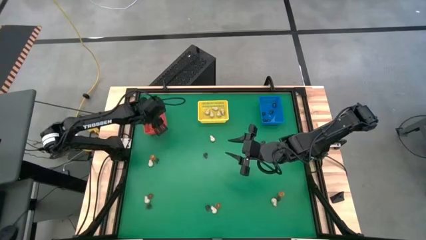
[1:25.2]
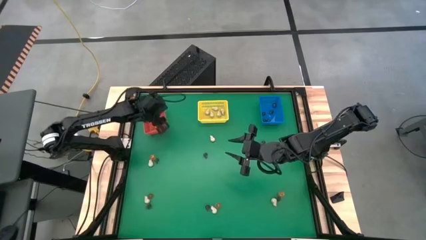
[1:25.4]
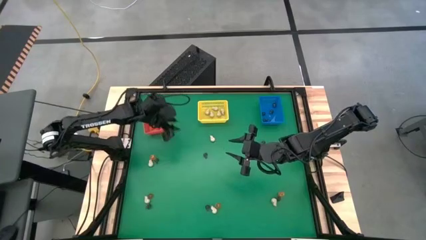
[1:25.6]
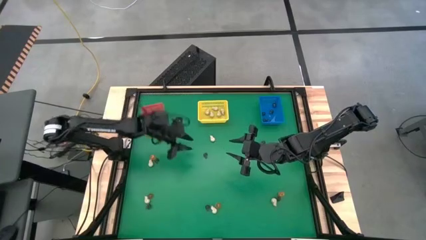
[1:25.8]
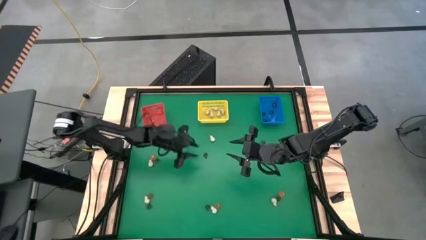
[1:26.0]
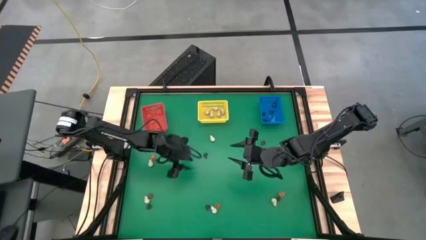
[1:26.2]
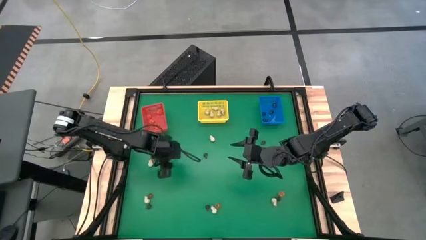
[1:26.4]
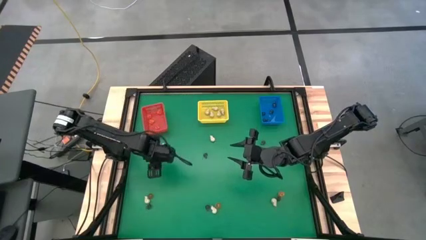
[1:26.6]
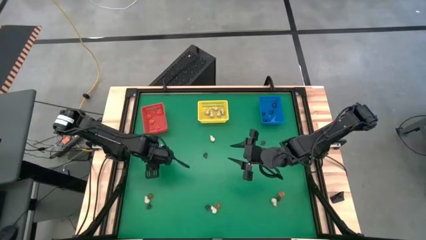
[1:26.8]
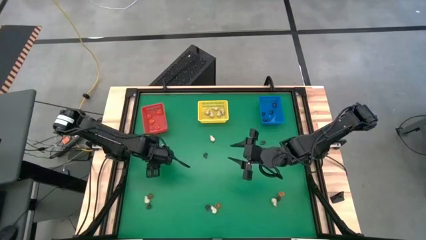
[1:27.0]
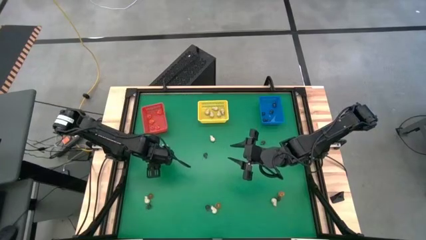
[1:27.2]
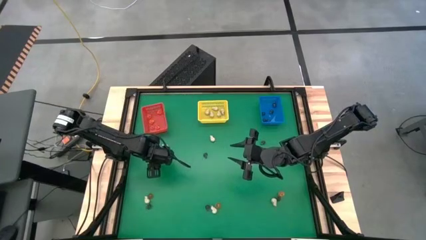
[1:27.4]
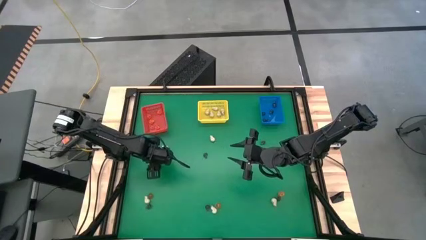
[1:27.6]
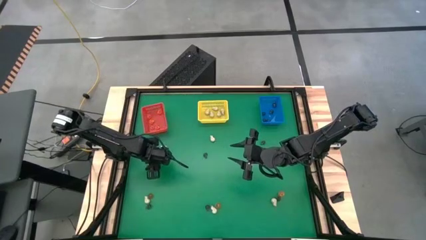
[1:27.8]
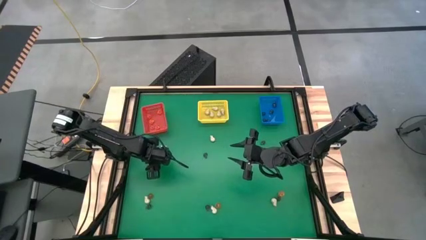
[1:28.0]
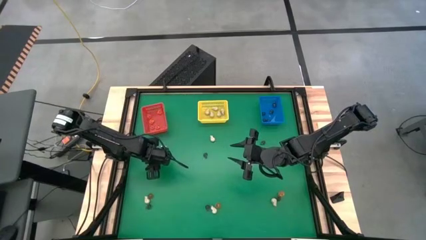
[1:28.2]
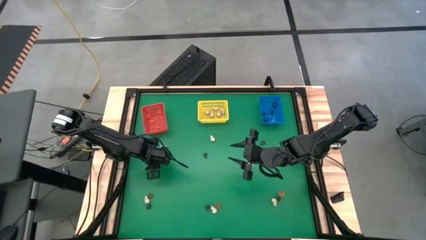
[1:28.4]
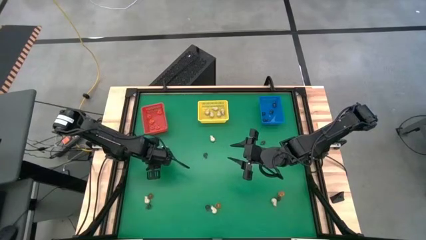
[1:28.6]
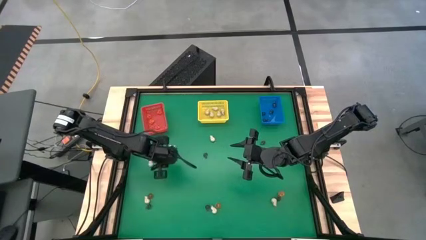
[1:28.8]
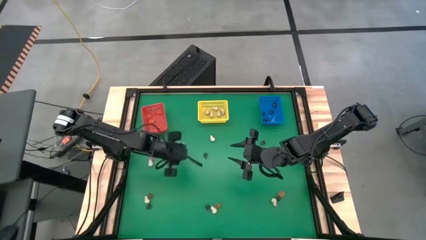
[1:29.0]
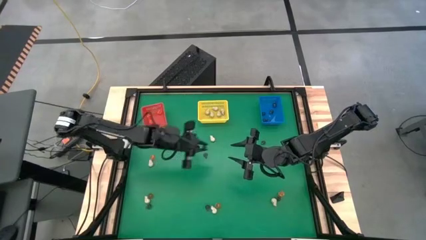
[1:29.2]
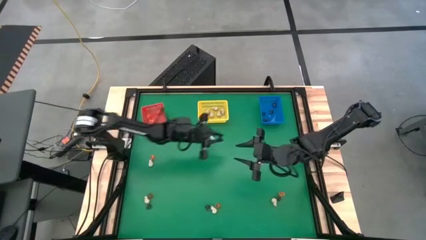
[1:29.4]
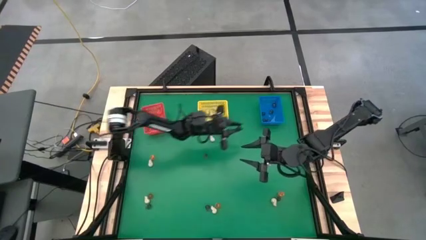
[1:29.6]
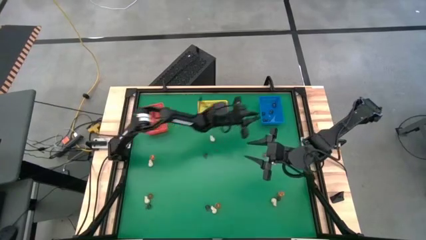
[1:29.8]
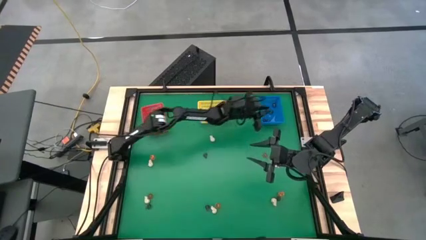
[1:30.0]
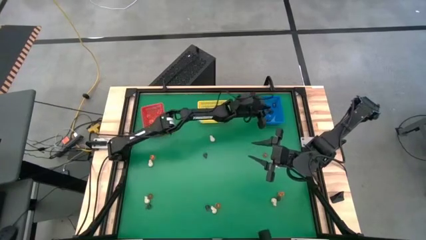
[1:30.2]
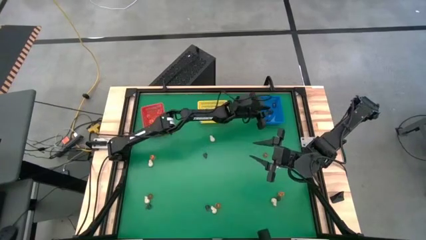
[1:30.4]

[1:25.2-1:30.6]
Task: Sort Halloween decoration
Put the purple skull toy into the blue bin

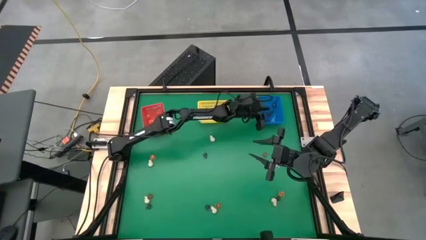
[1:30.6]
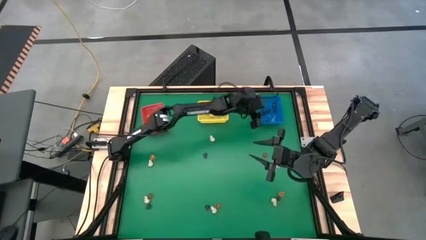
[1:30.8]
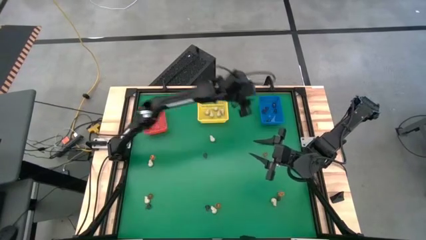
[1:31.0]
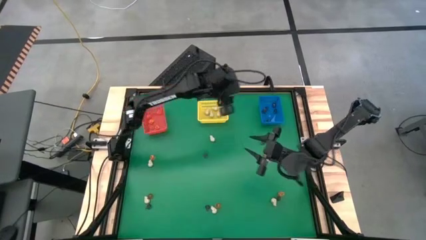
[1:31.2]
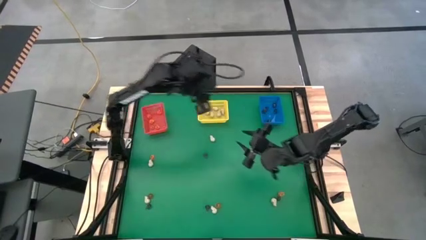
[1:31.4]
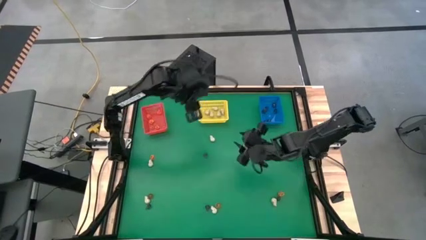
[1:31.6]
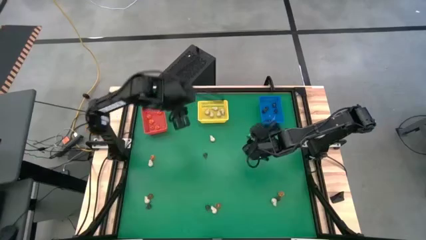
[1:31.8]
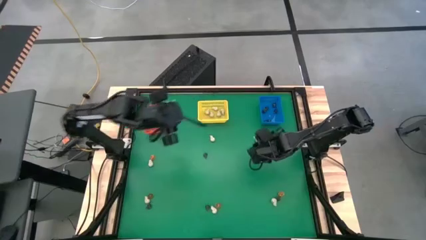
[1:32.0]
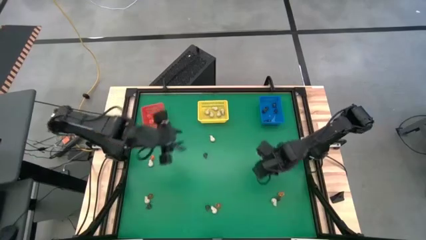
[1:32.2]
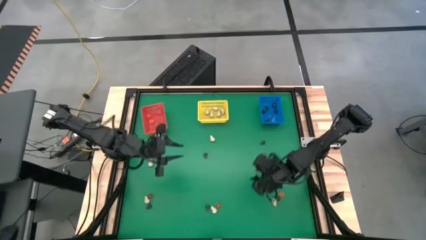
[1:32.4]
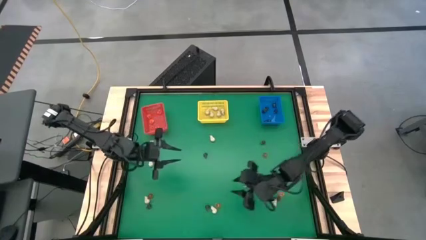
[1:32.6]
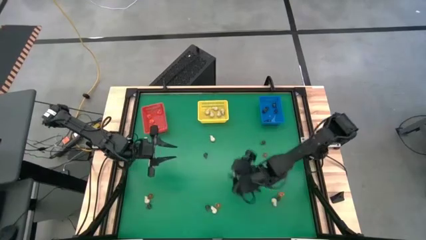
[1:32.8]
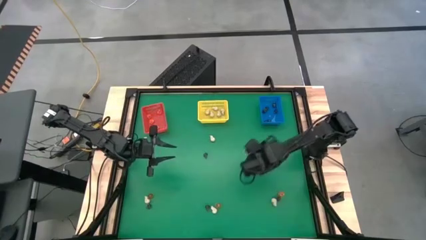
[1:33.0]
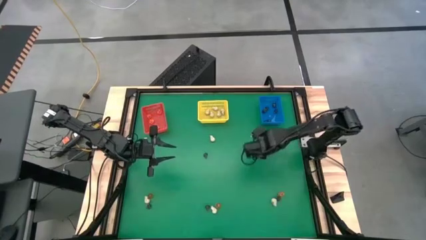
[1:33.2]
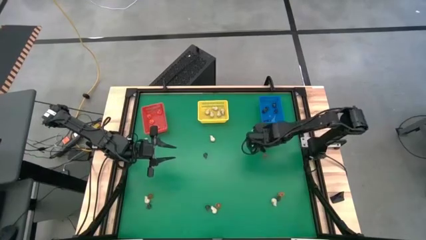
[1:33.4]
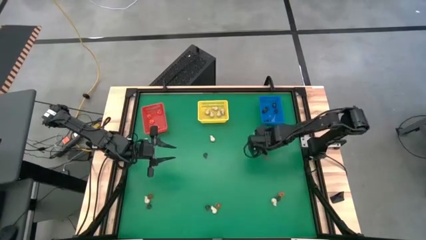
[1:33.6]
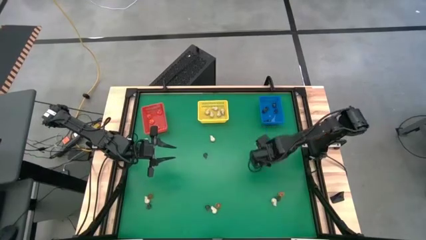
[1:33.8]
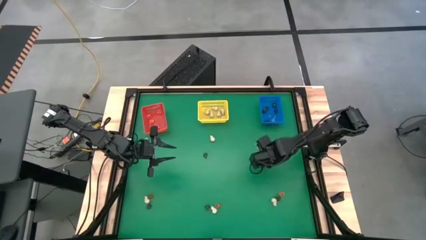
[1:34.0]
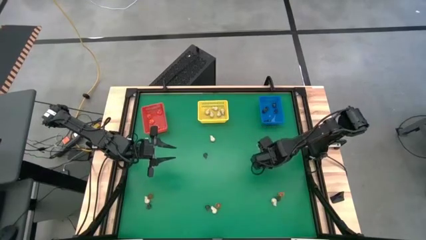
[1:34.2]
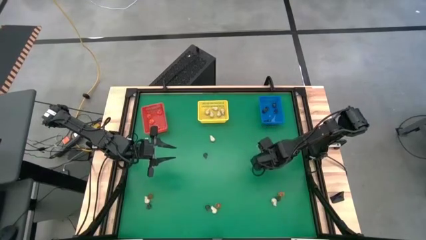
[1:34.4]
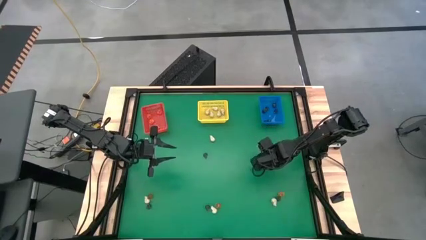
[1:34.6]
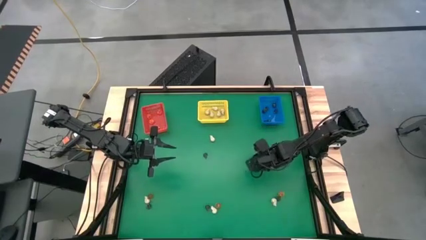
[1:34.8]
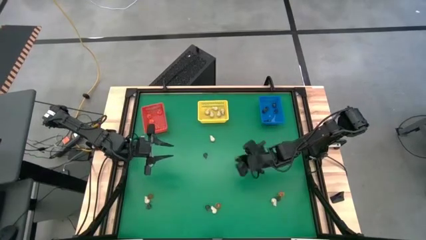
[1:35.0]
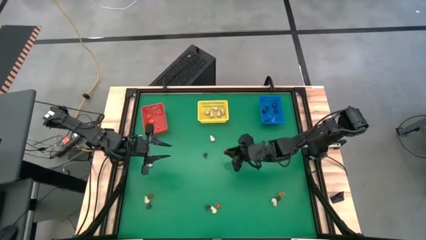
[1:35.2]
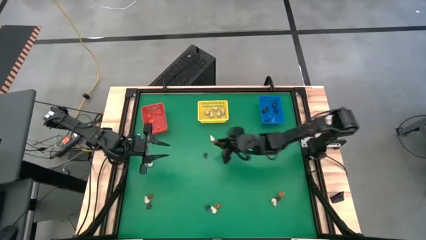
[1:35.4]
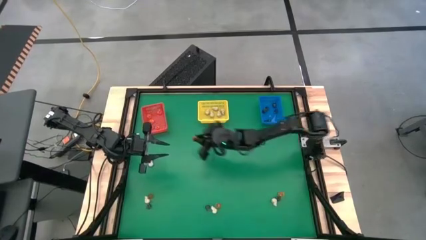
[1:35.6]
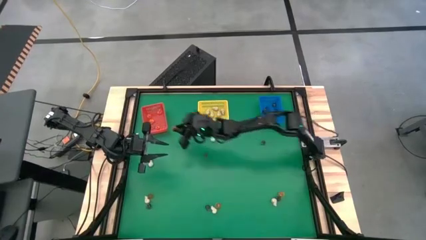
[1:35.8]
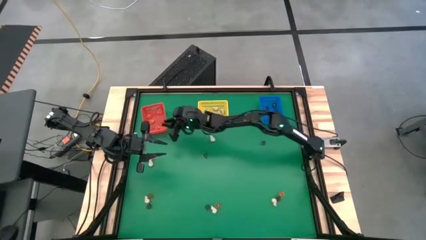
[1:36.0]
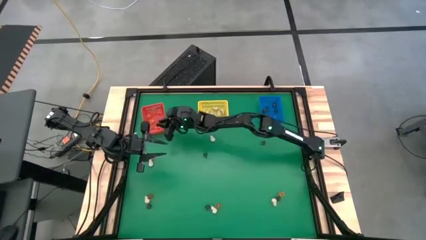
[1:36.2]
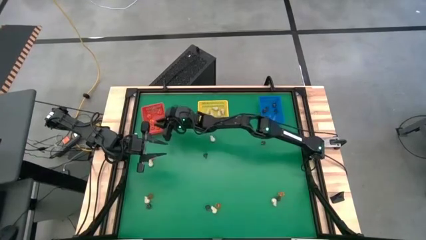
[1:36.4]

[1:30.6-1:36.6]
Put the orange flower toy into the red bin

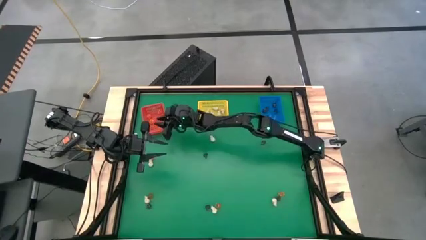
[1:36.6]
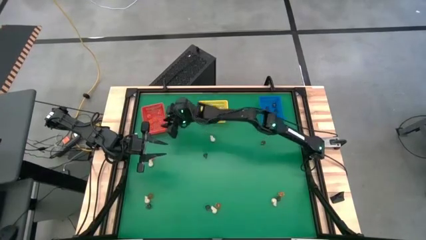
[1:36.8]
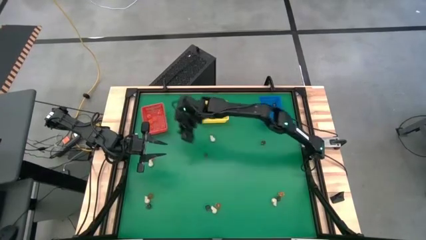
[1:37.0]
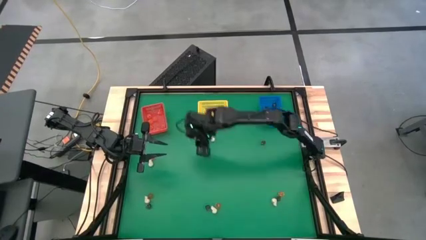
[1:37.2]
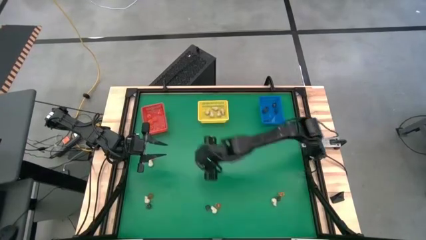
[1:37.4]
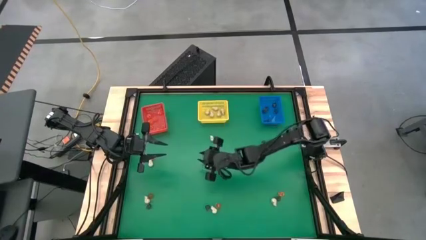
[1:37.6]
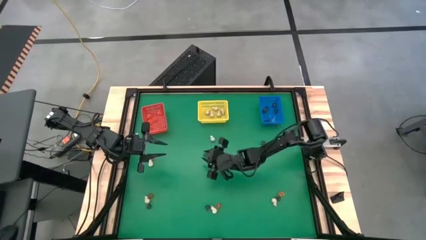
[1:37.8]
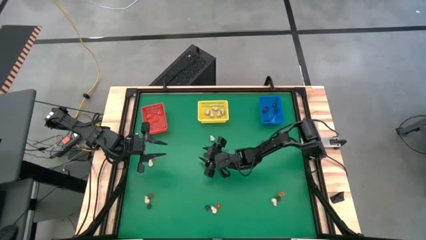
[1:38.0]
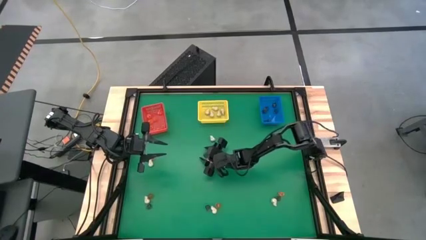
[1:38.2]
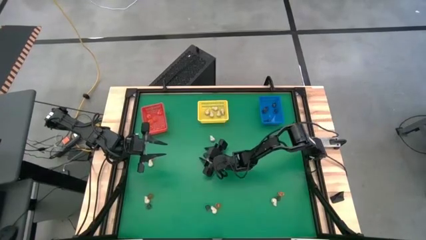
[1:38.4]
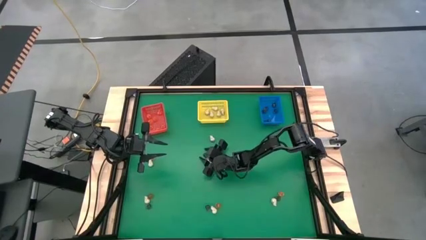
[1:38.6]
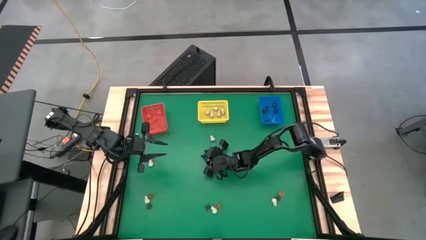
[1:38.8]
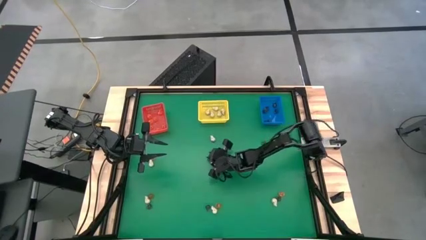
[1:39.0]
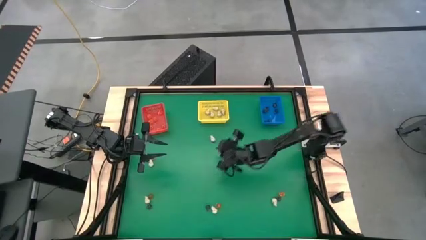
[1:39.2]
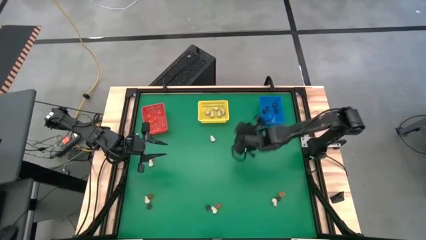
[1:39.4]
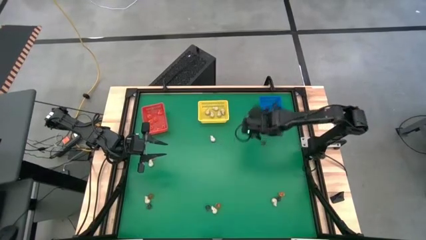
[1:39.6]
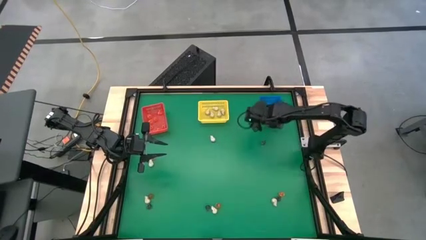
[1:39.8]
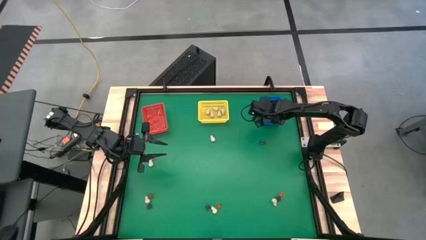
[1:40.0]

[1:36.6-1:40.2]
Put the purple skull toy into the blue bin

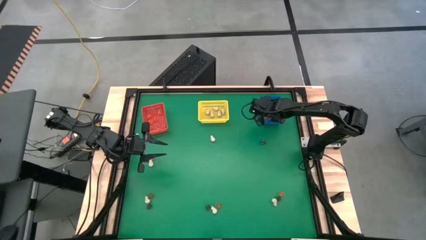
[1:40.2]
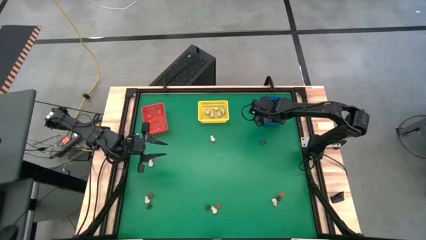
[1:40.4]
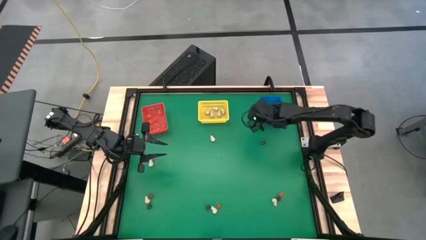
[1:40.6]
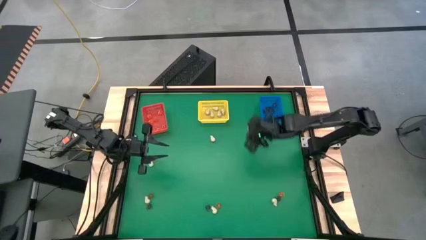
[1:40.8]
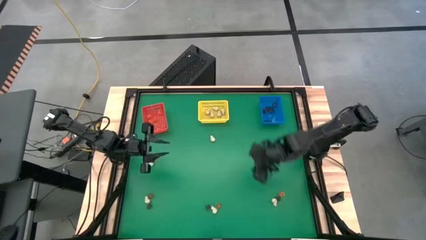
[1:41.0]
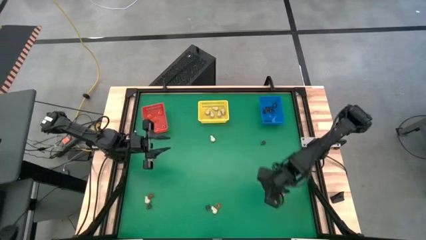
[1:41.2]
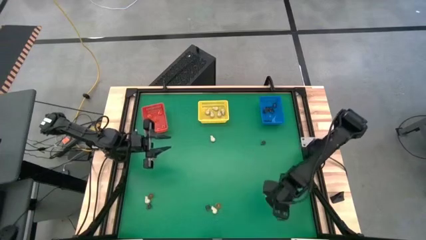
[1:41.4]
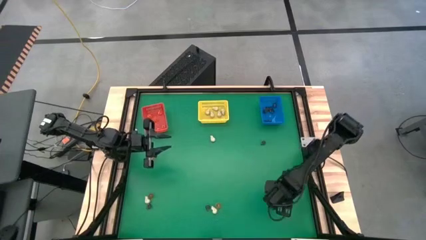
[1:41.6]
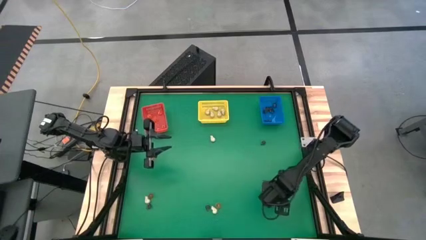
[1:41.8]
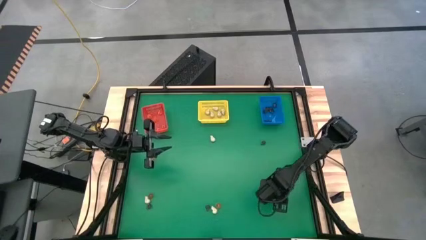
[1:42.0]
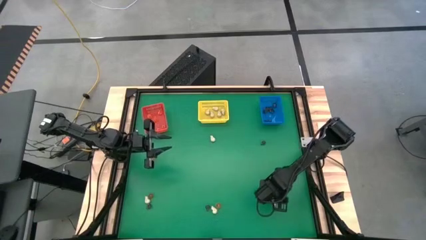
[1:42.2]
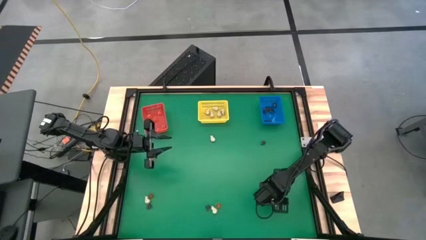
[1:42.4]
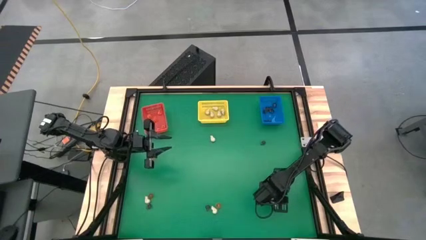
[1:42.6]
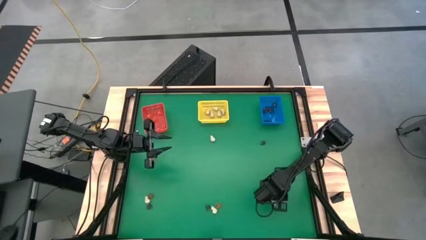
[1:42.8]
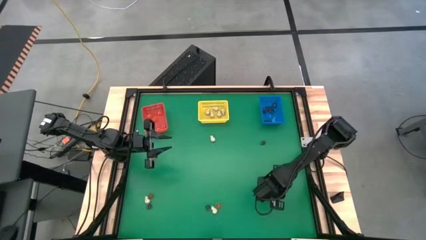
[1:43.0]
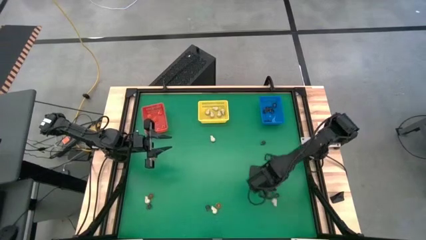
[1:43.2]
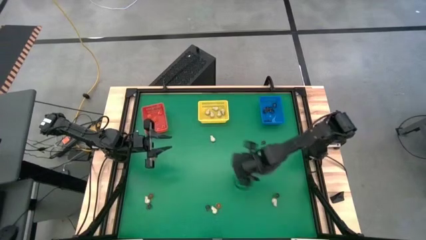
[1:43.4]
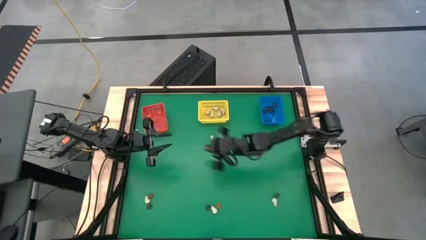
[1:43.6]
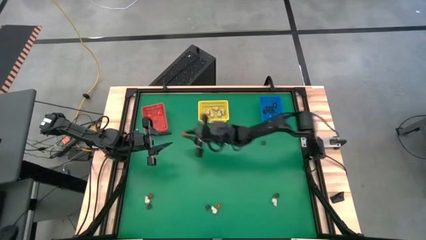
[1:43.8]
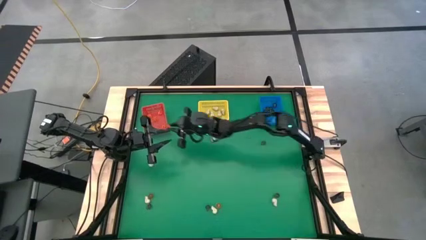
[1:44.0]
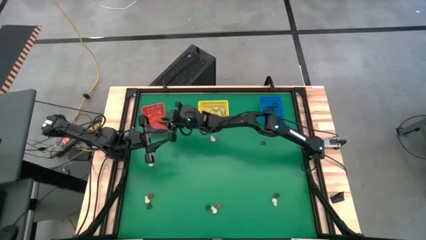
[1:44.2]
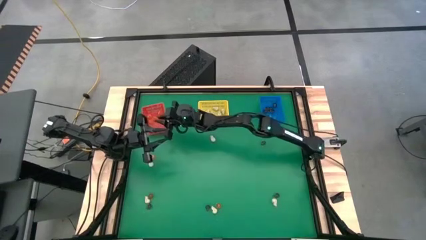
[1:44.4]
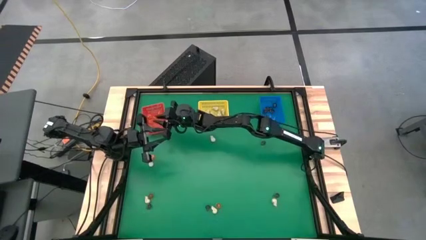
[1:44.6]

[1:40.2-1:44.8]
Put the orange flower toy into the red bin
